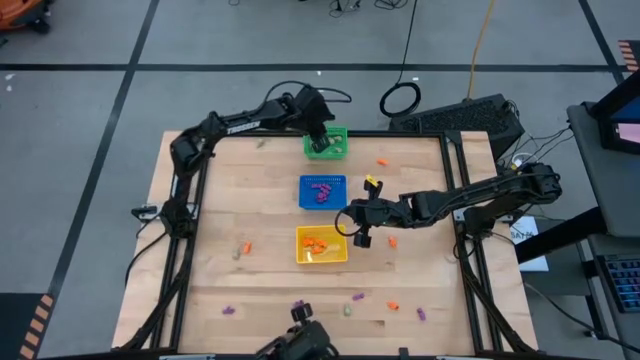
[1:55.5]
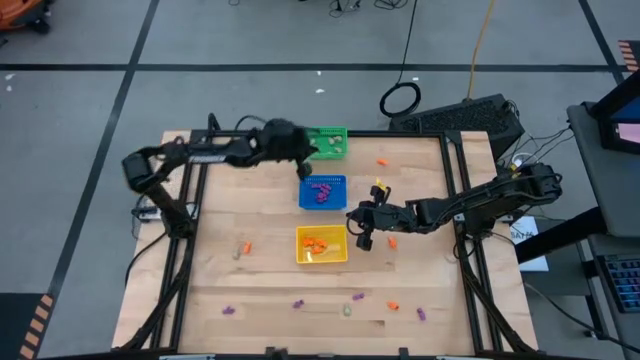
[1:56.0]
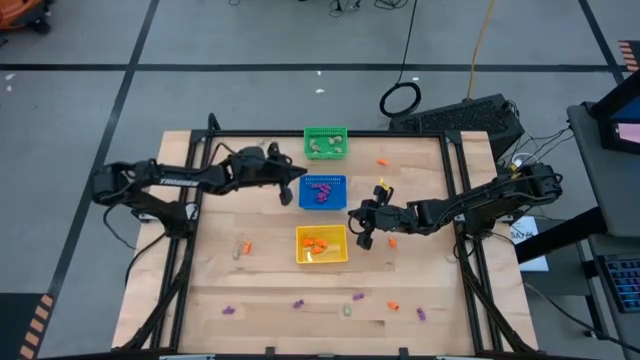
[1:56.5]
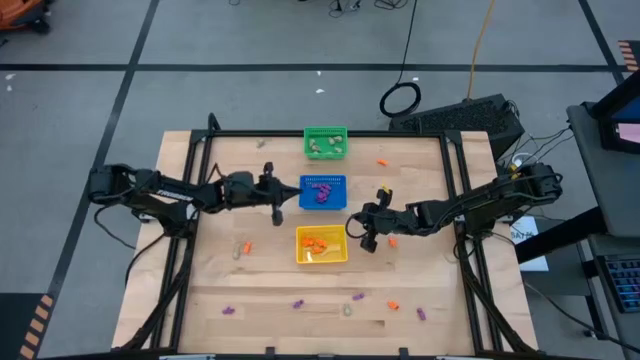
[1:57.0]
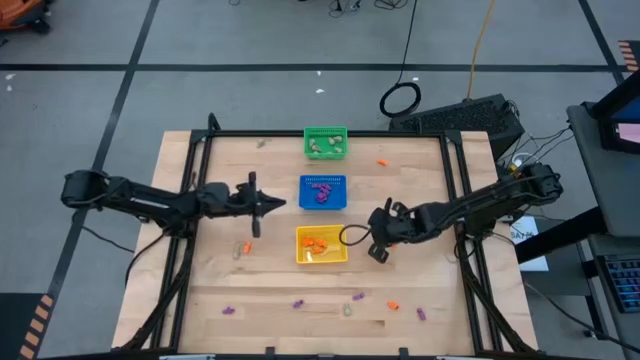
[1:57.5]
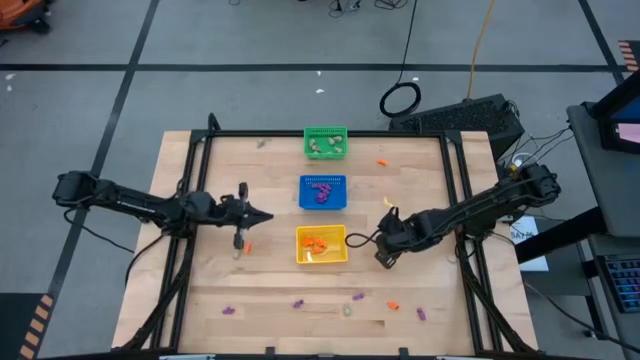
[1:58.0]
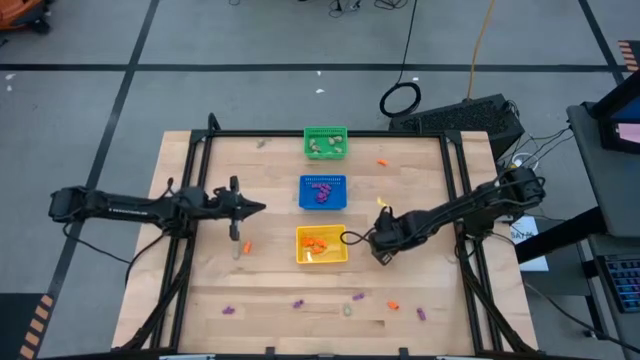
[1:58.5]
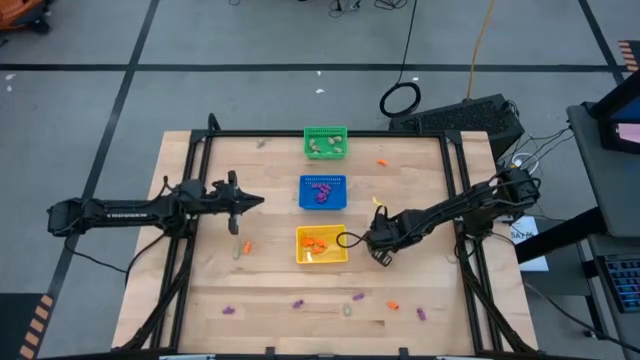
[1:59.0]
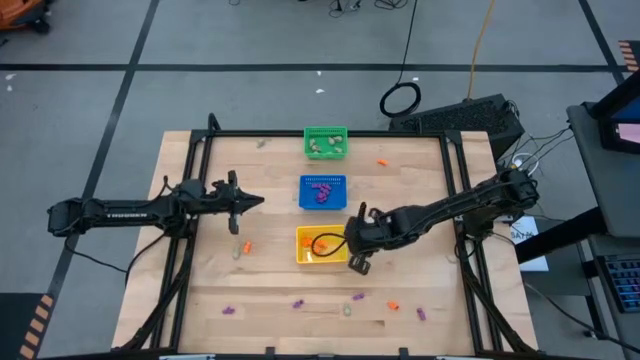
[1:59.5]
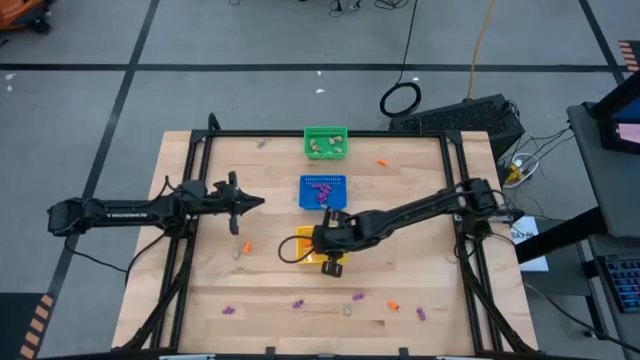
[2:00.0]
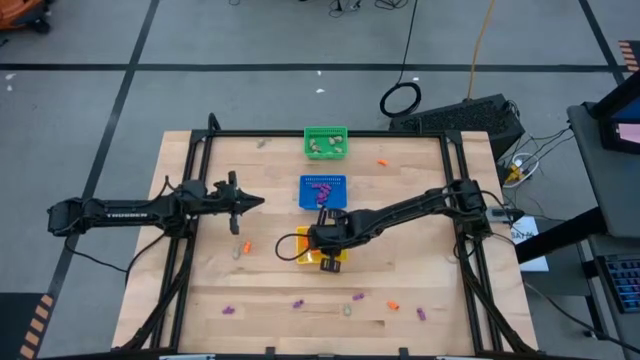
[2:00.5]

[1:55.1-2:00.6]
Task: Sort Halloween decoration
Put the orange skeleton toy into the yellow bin

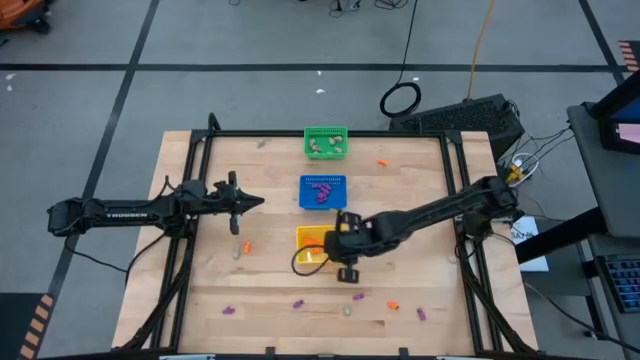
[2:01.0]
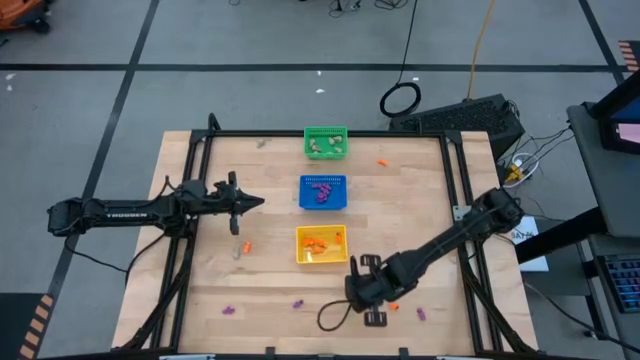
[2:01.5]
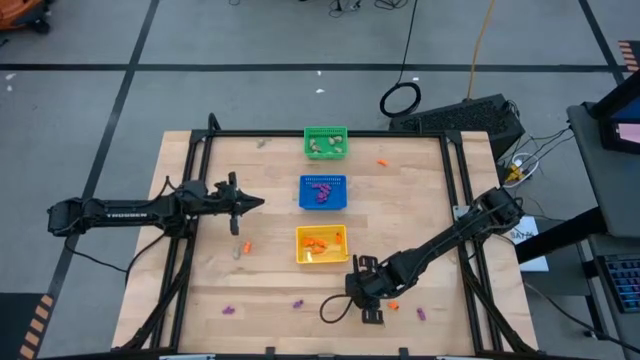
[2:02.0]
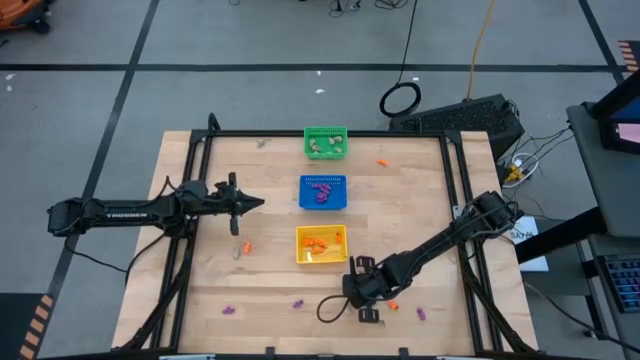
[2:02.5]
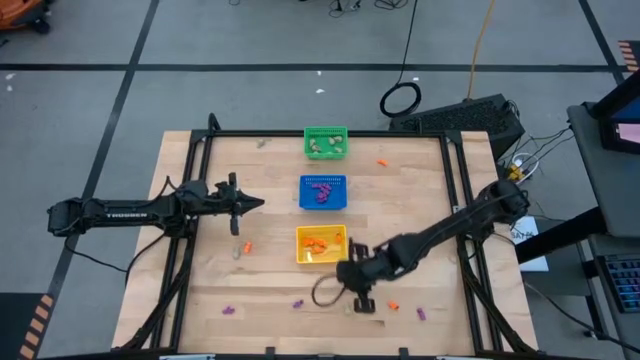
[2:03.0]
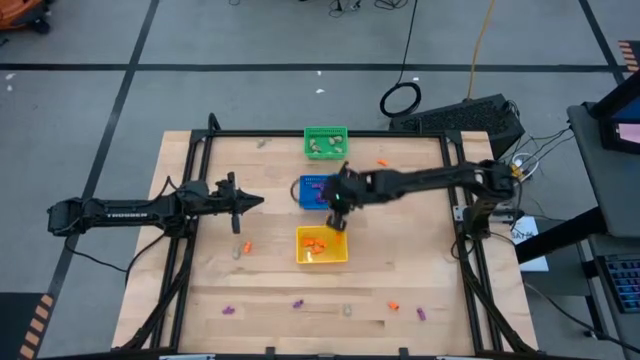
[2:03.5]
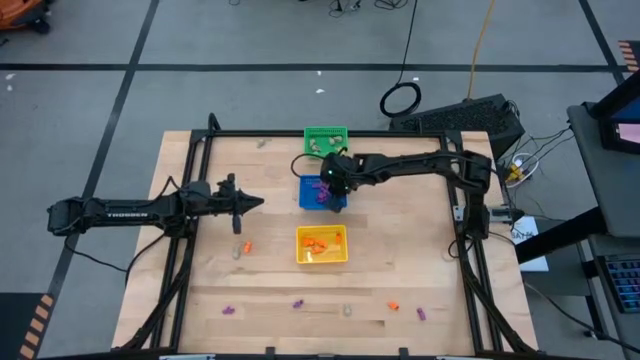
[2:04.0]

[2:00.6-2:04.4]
Put the purple skeleton toy into the blue bin

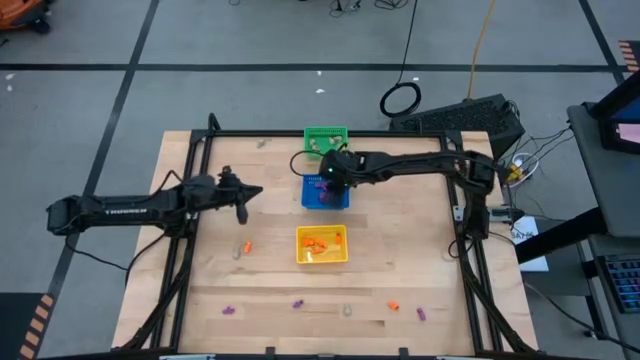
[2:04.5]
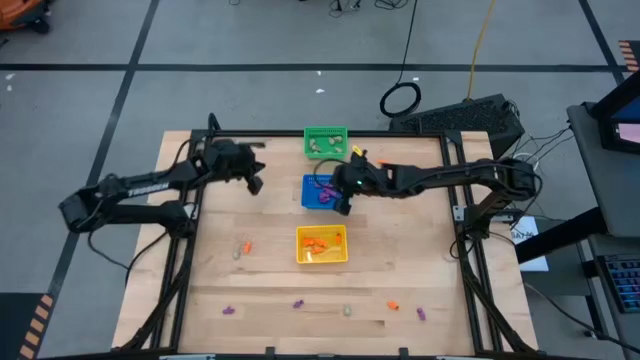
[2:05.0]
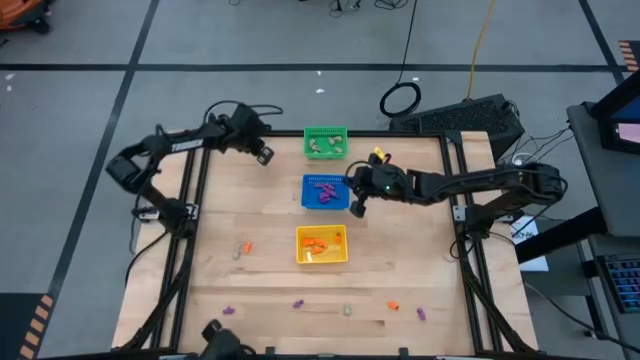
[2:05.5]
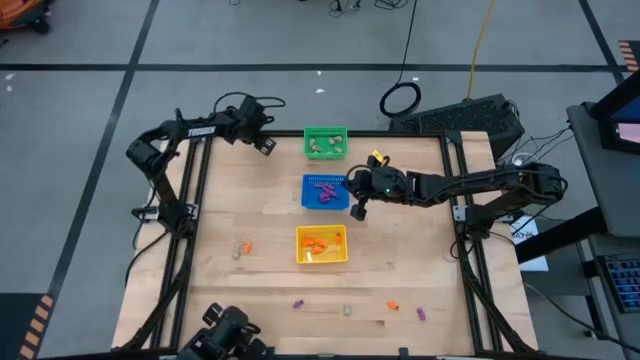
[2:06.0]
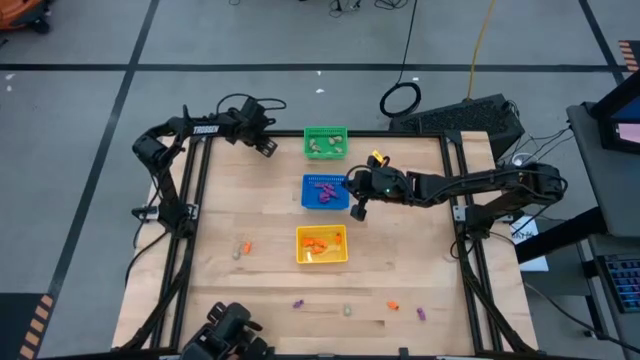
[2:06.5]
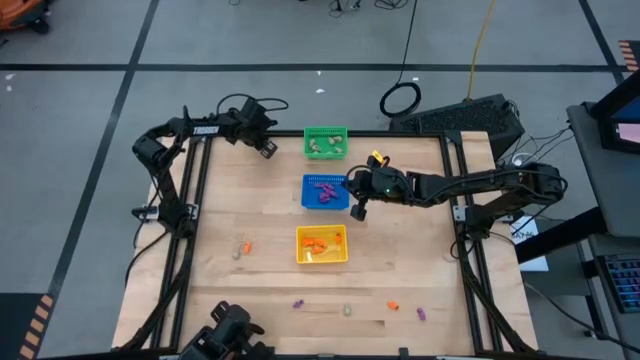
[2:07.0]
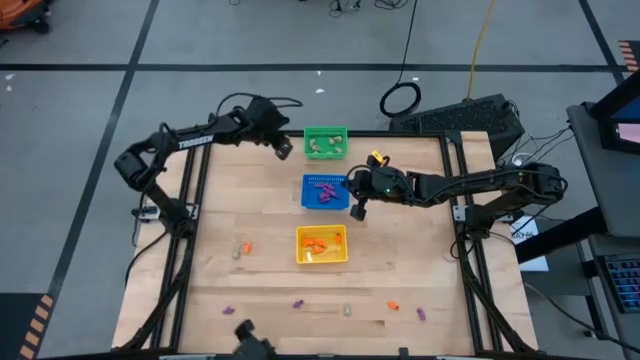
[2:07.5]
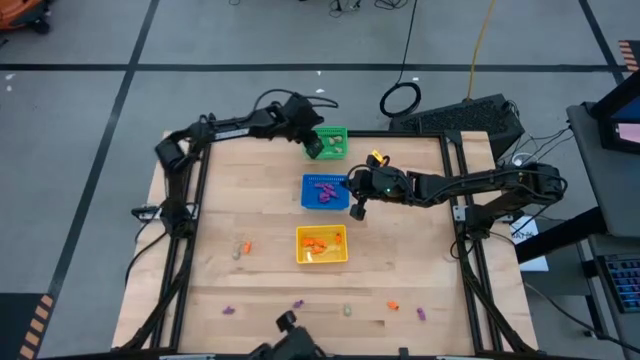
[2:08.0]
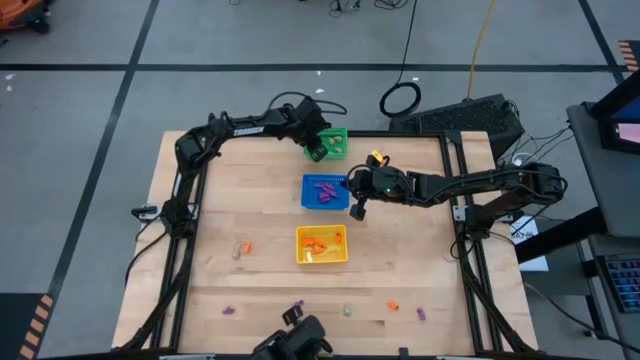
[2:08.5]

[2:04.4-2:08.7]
Put the white skull toy into the green bin

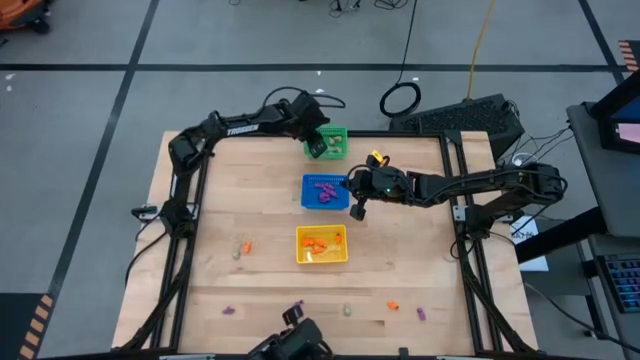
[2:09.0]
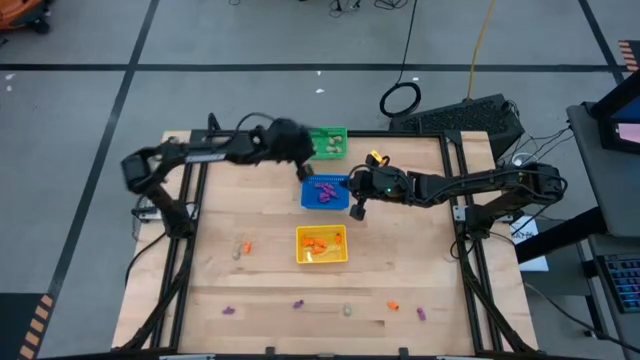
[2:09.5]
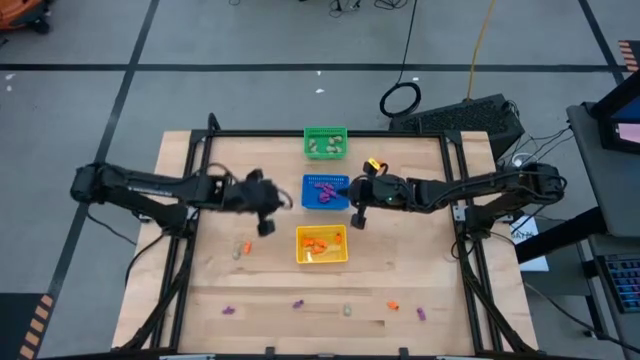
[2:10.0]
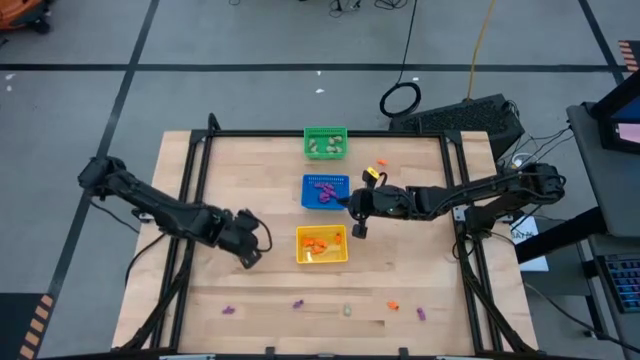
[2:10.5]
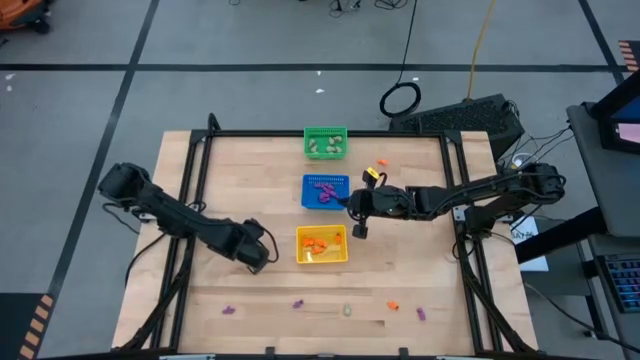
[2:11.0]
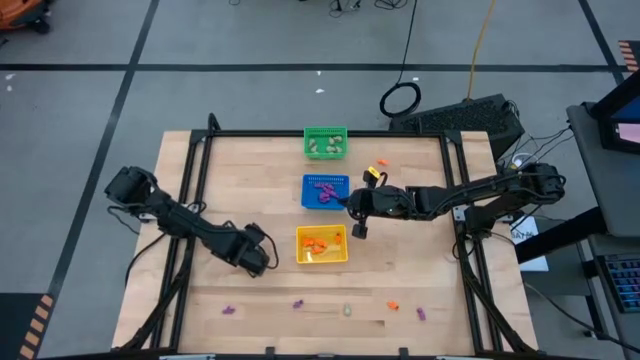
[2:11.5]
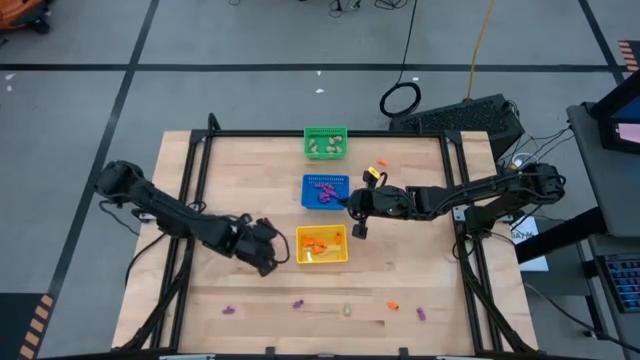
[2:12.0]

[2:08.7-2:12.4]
Put the orange skeleton toy into the yellow bin

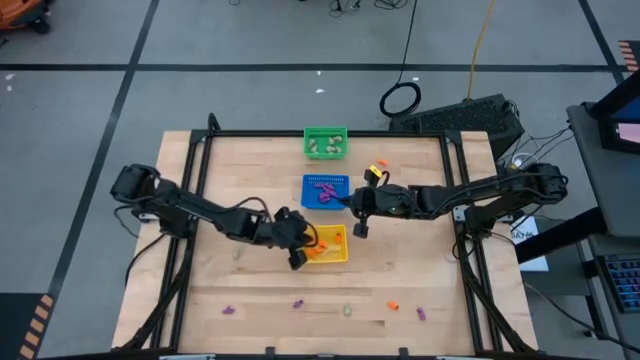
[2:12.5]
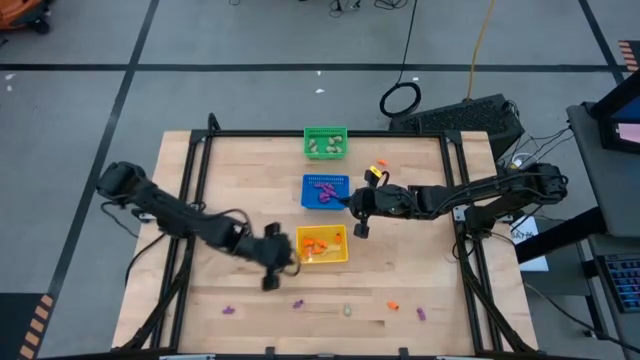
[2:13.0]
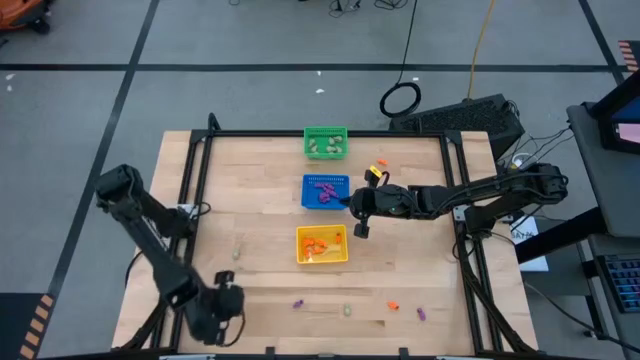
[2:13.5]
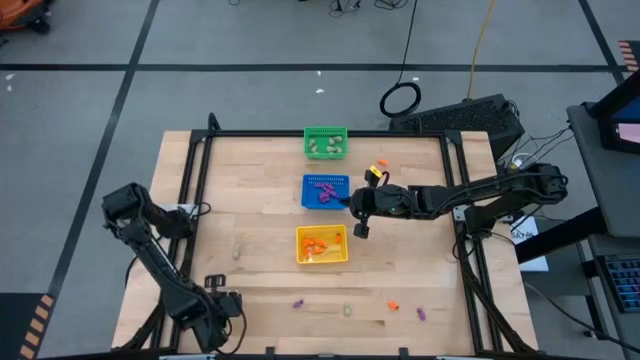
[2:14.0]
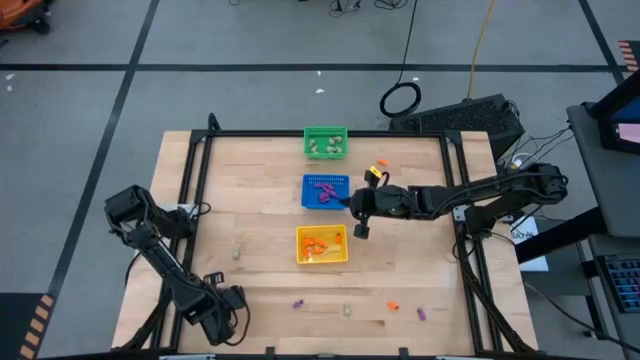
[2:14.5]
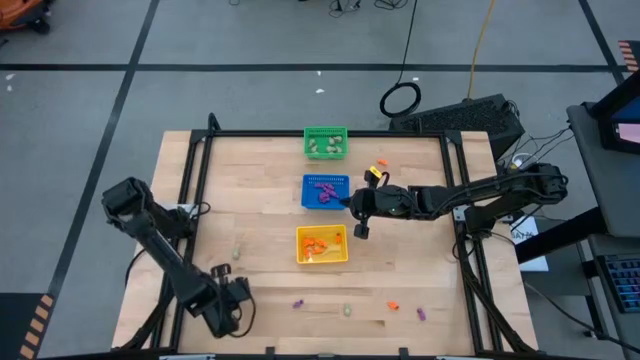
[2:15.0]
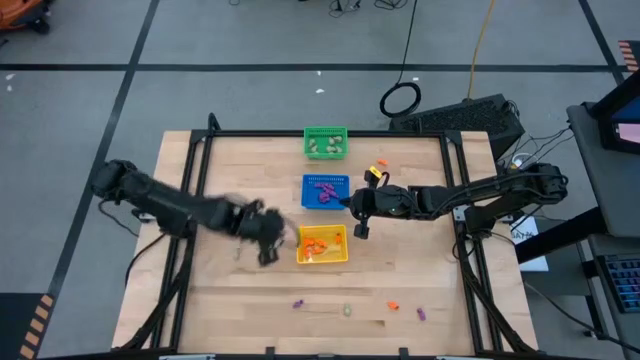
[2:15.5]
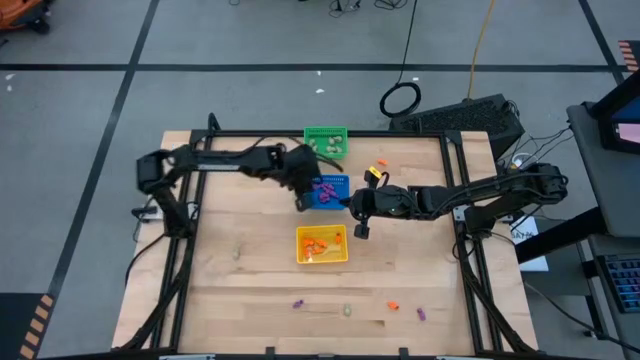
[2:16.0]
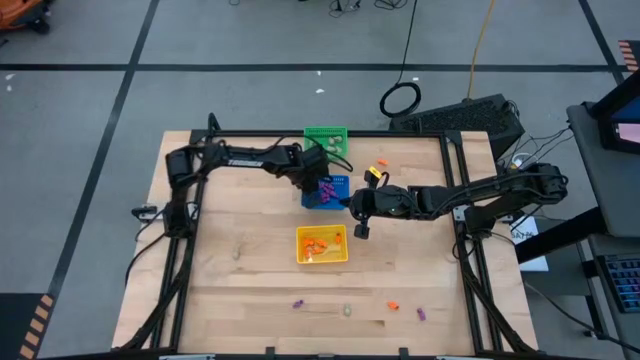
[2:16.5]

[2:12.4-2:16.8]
Put the purple skeleton toy into the blue bin
